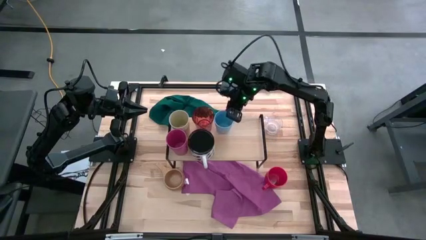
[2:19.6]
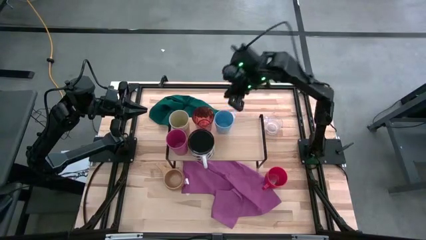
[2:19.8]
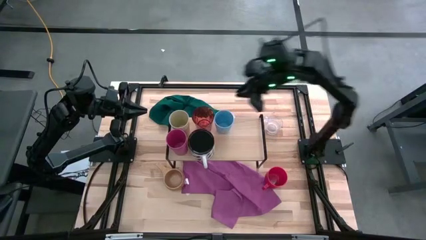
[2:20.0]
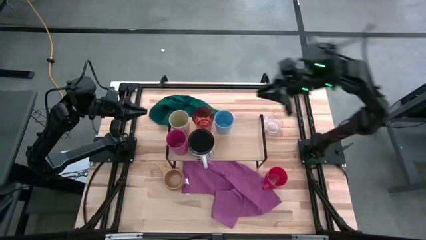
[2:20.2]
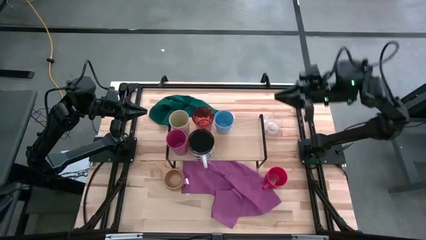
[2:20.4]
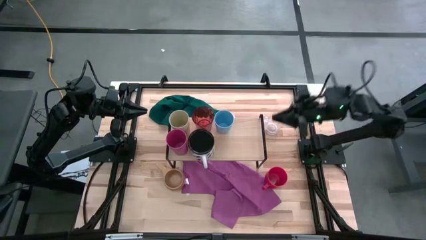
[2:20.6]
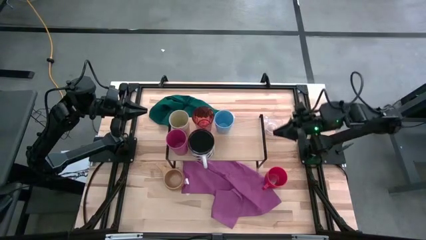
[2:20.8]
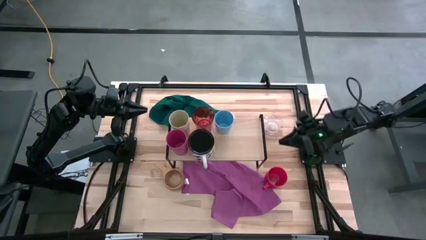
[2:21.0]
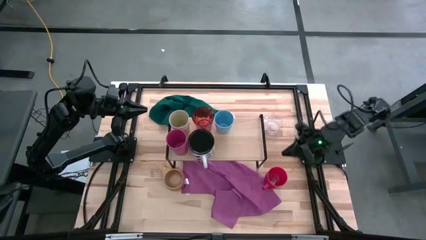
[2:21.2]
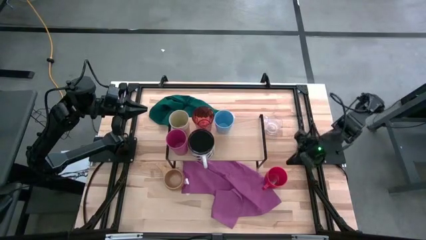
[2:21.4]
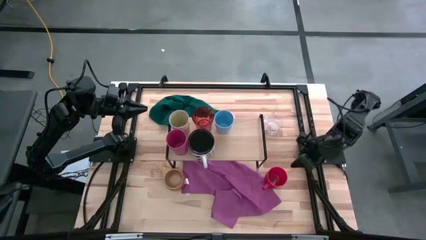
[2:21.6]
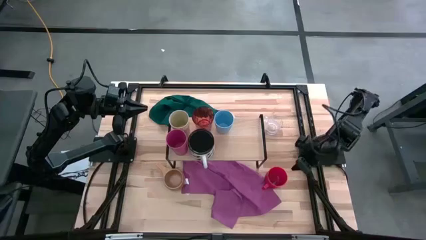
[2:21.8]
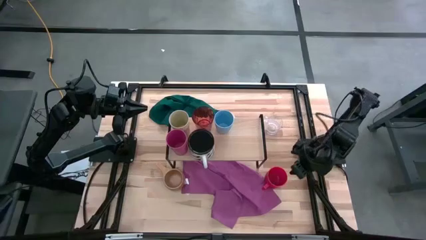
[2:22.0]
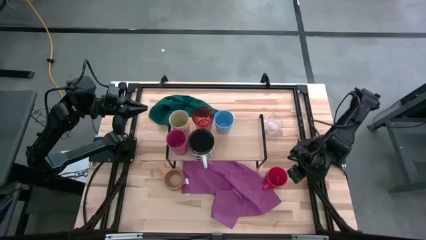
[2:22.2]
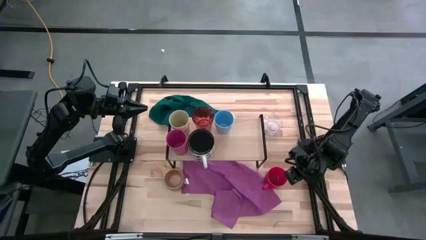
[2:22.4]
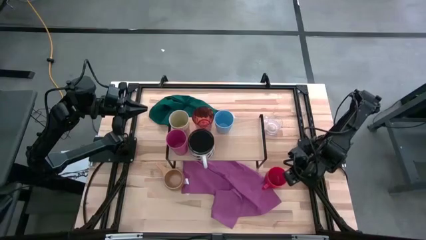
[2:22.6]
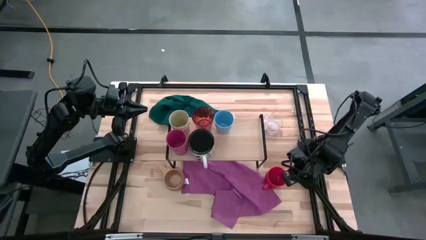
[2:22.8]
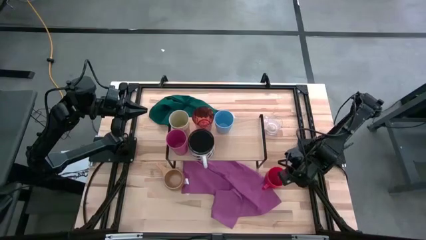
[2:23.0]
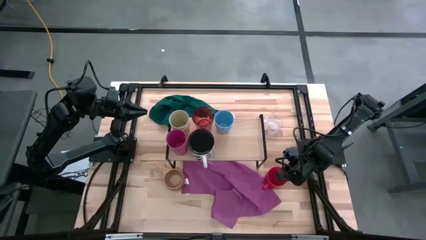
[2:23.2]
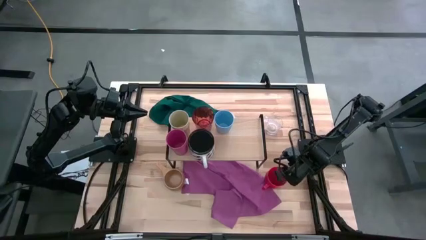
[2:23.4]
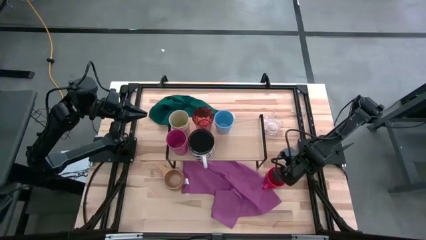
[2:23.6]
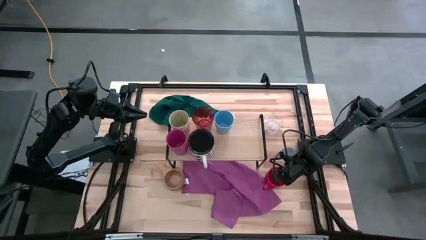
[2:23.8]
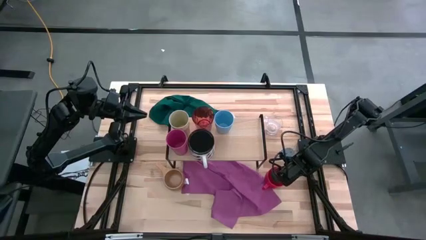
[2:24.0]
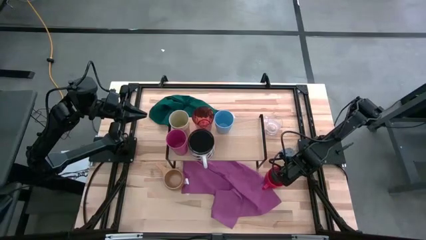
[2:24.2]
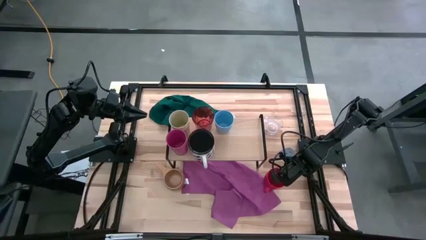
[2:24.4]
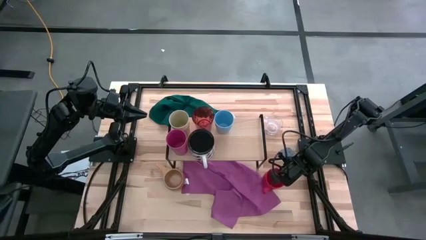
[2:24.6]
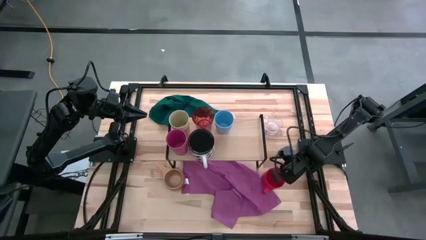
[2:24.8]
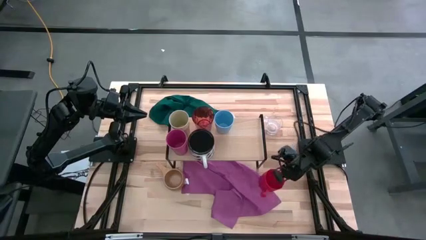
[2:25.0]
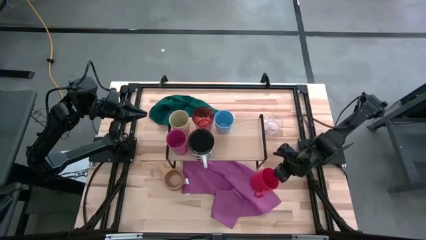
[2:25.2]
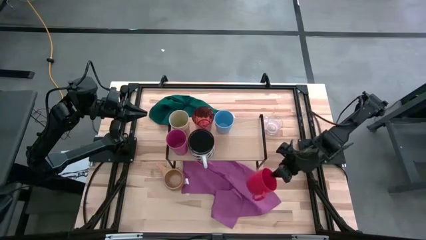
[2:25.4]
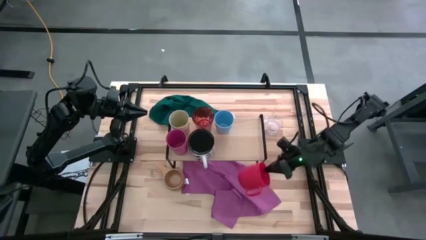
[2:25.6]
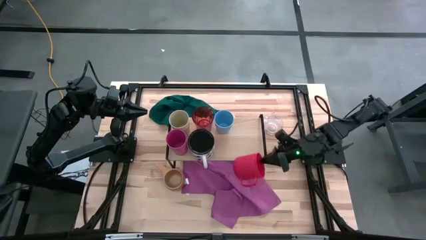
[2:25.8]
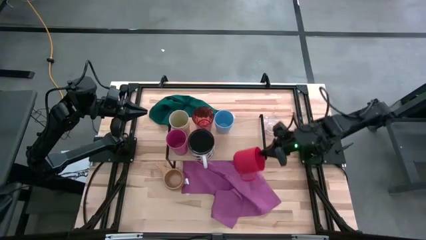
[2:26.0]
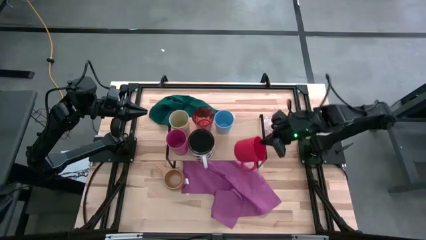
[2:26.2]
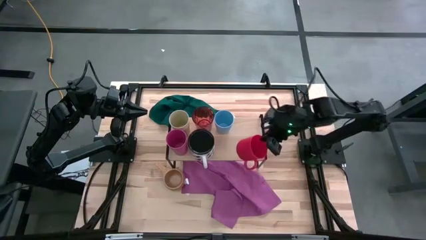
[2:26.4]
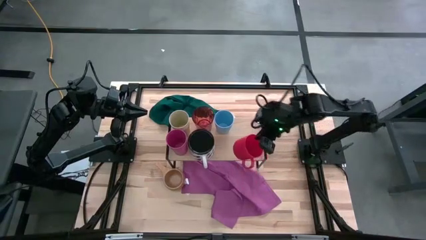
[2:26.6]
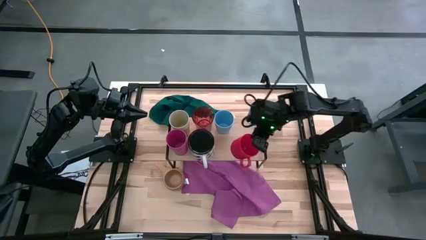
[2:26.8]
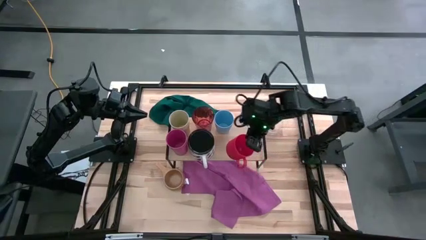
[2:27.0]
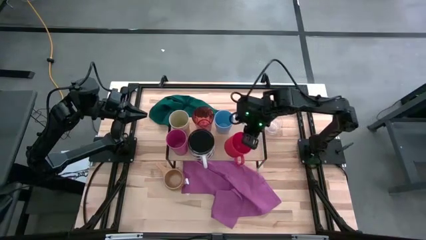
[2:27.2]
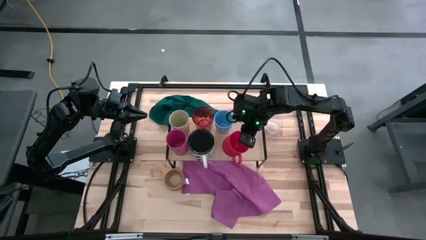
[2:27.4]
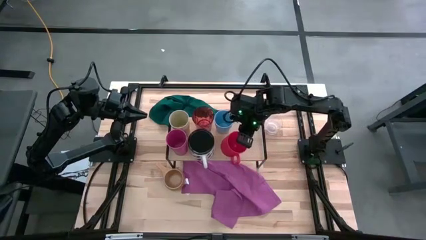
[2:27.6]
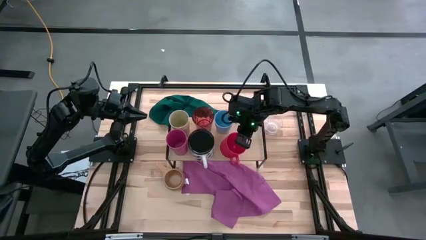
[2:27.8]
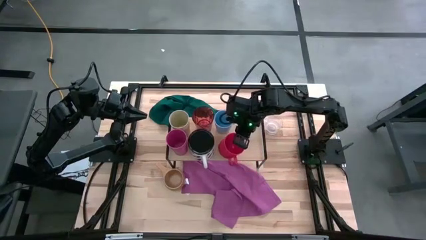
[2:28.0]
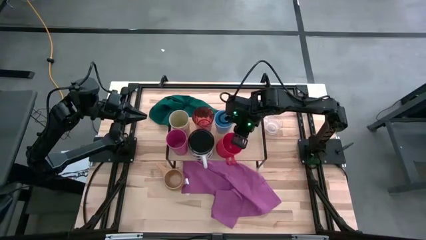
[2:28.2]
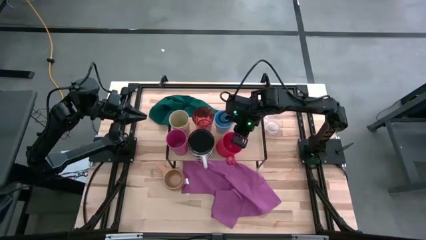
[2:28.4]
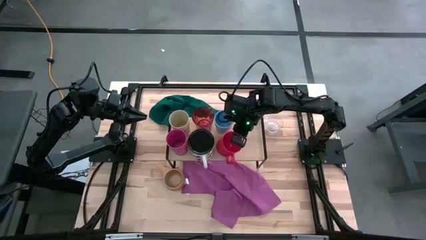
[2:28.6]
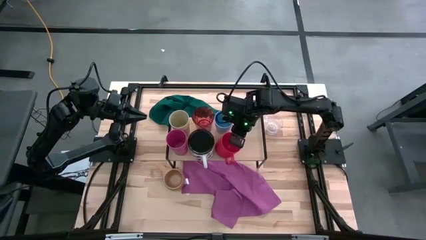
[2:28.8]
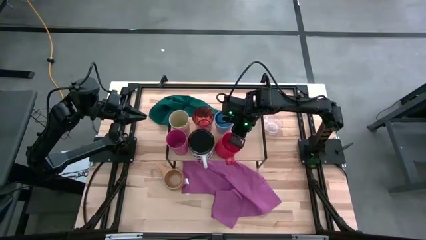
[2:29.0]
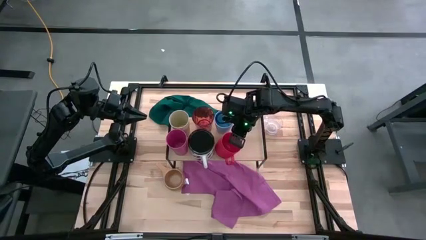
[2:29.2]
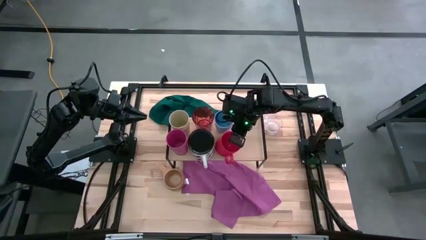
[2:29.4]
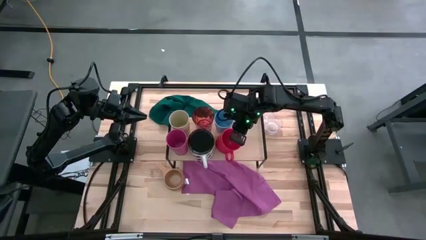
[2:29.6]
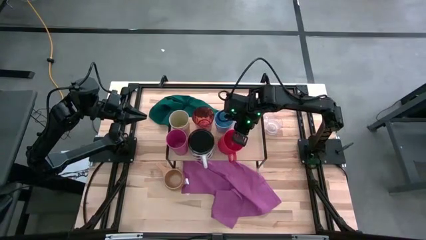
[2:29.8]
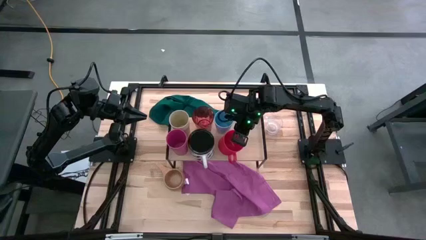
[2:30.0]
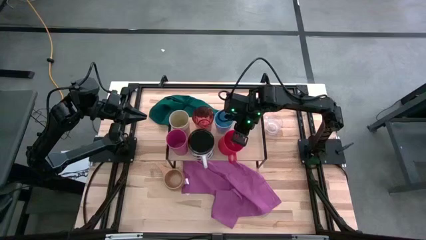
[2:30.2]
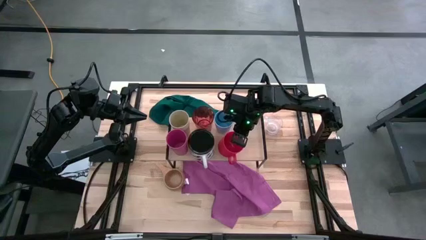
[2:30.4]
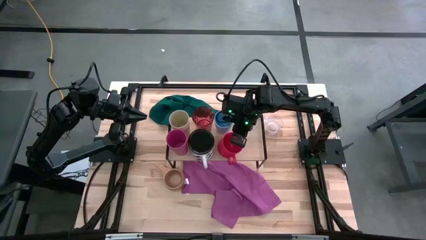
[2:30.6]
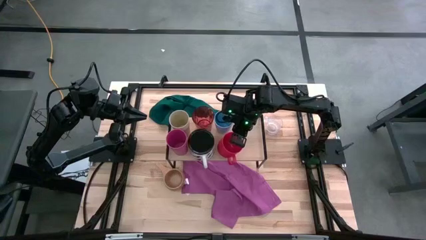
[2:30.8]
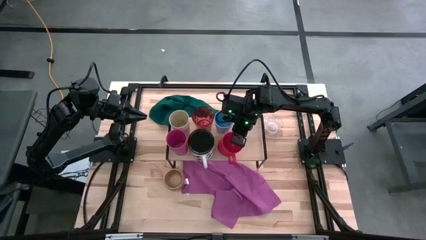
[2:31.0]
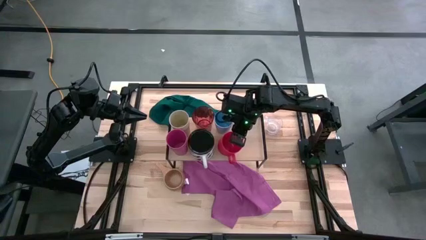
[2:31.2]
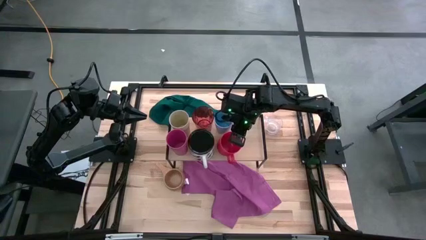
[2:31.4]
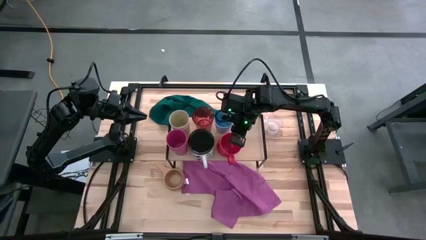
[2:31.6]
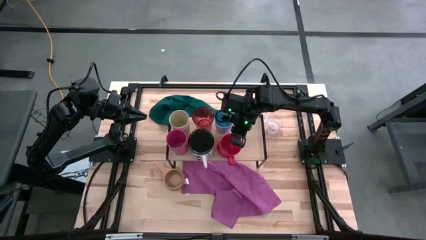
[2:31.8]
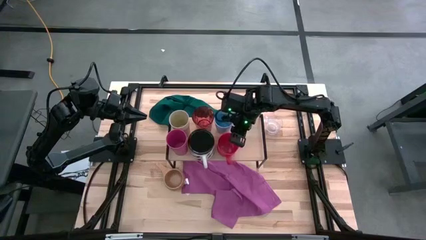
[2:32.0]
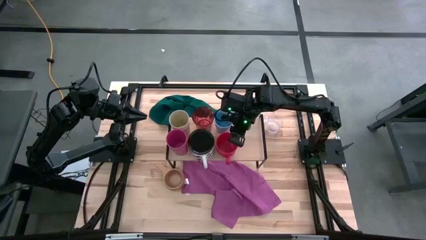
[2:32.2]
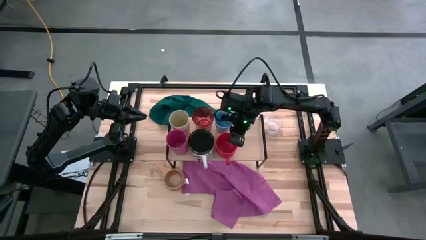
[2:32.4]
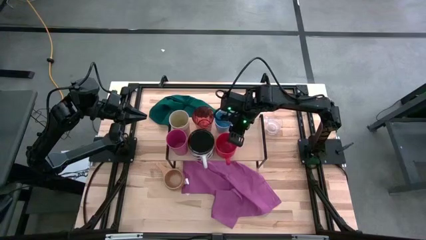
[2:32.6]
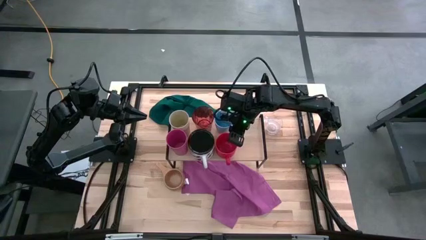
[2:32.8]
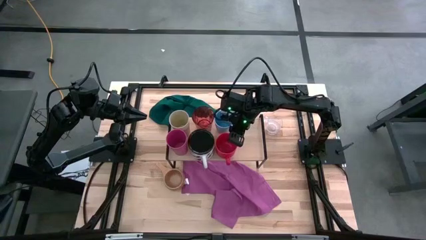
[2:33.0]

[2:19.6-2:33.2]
Task: Stack small to large cups/mugs on shelf
Put the red mug on the shelf

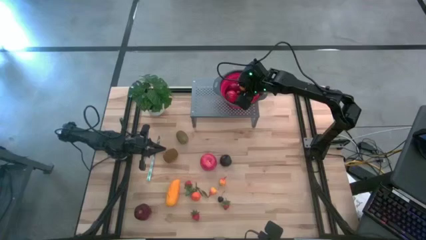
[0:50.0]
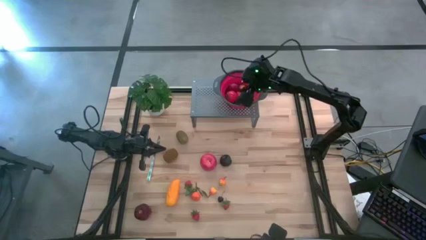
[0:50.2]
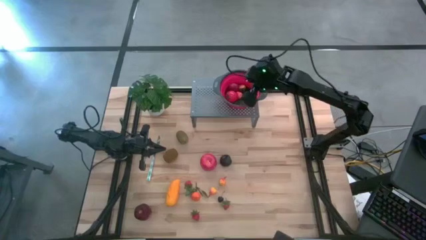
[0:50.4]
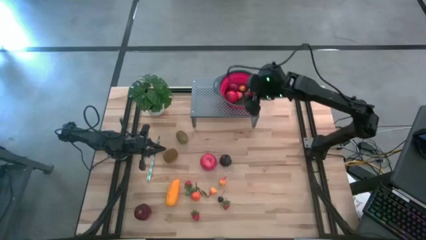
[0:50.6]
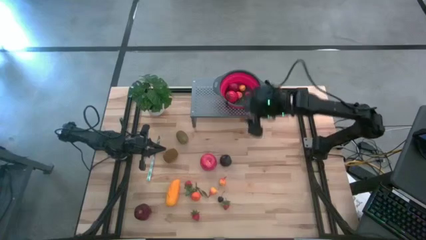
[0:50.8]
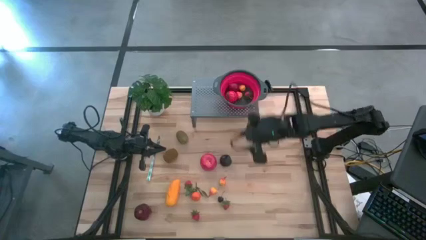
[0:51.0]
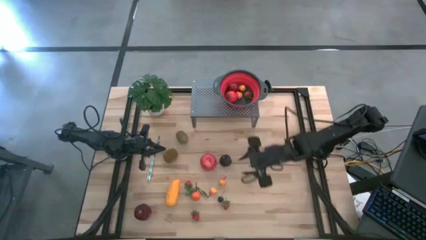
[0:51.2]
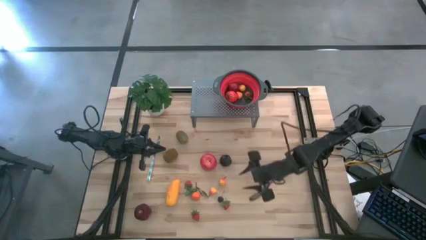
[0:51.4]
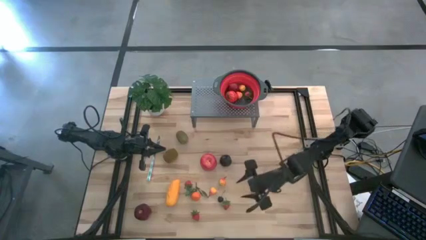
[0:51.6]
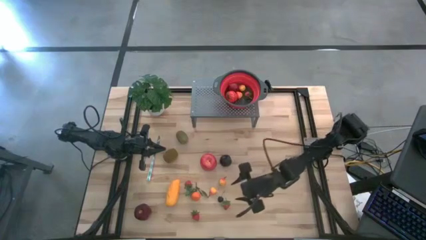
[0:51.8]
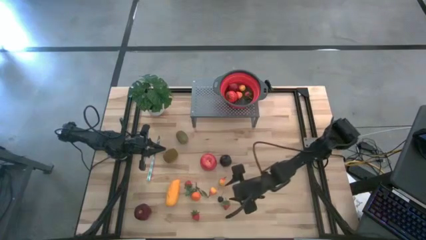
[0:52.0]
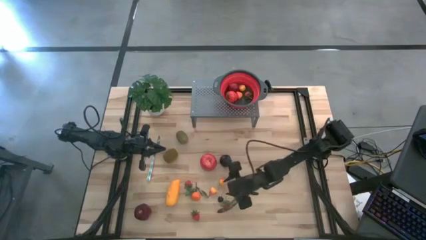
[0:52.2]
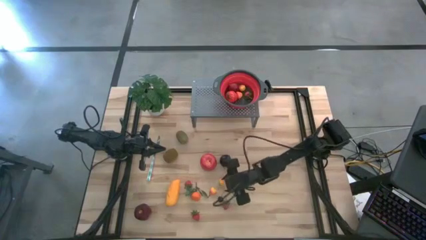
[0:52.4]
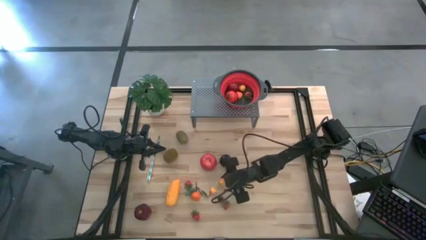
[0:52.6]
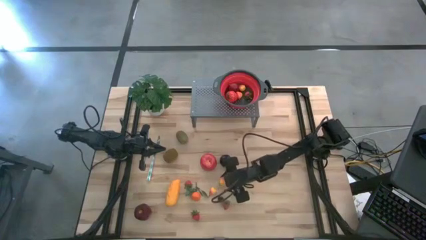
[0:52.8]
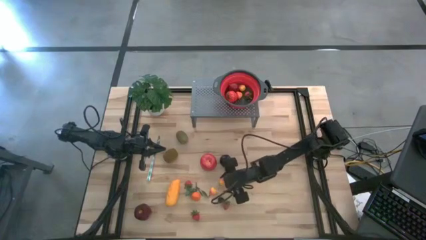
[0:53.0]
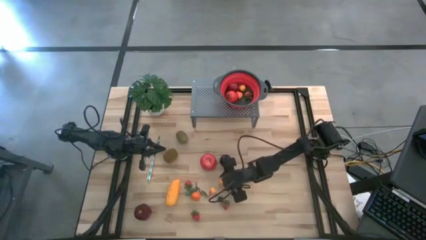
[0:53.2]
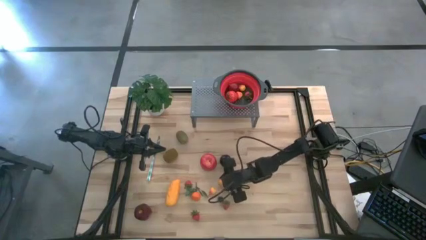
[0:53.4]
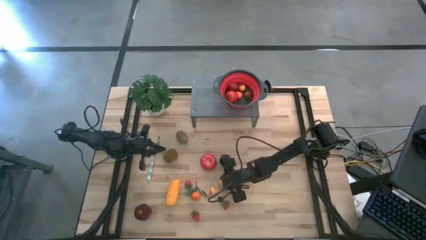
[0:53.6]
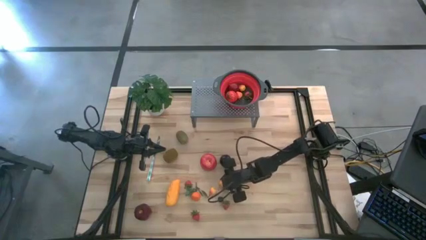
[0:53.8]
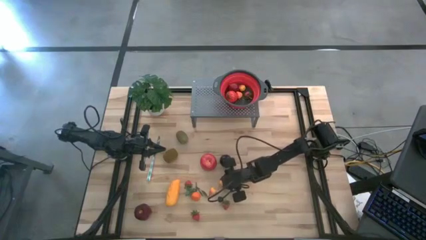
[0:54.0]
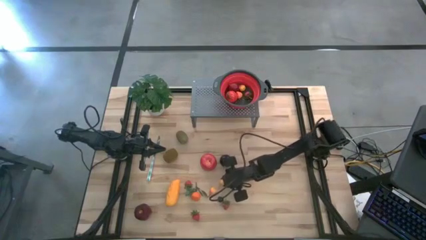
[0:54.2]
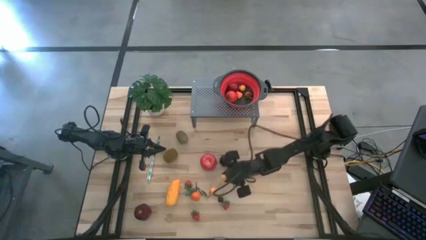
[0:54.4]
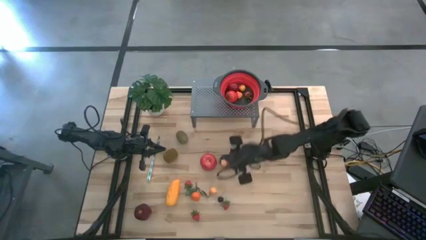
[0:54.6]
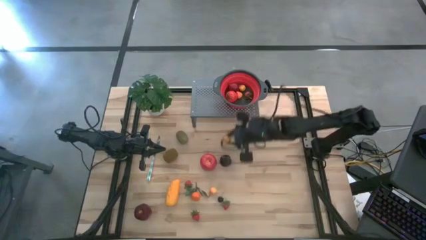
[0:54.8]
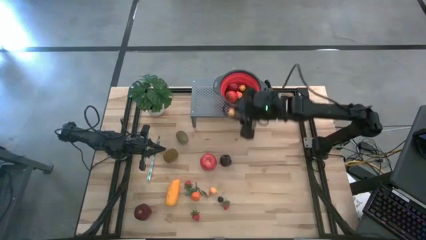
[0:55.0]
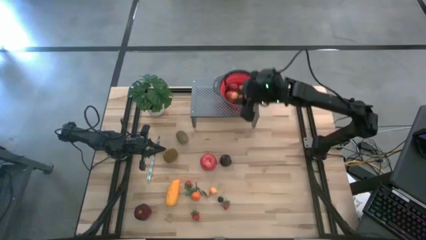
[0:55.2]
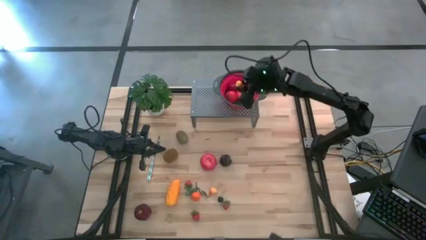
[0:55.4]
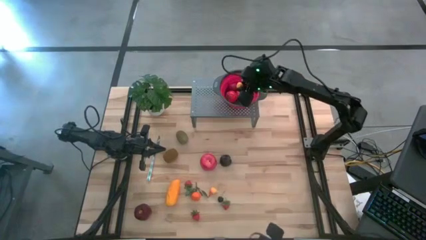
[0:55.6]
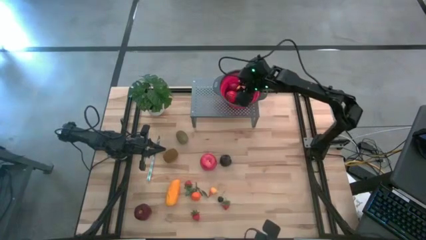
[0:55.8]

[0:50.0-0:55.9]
Task: Pick & Place Fruit
Put the peach into the strainer bowl on the shelf
